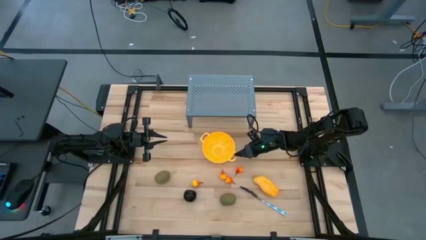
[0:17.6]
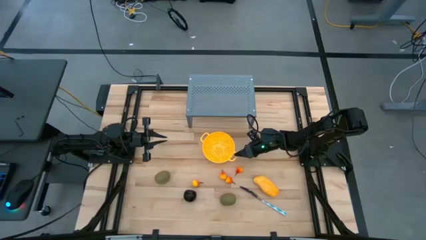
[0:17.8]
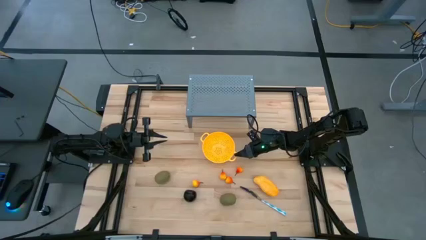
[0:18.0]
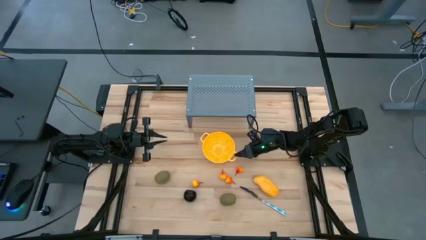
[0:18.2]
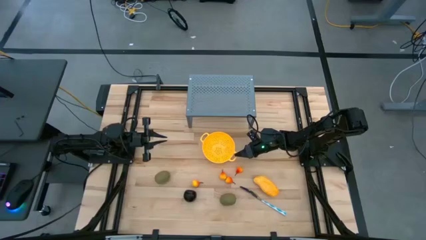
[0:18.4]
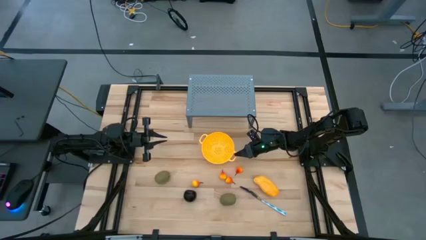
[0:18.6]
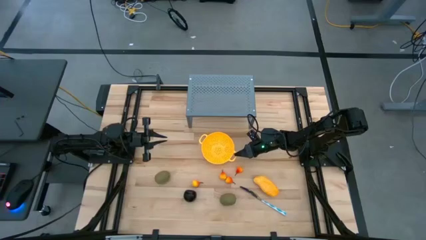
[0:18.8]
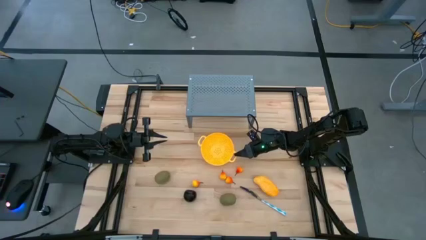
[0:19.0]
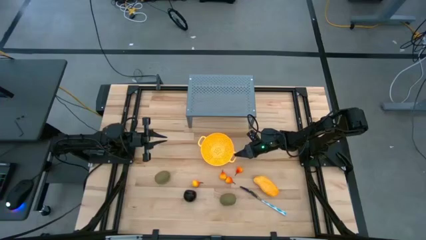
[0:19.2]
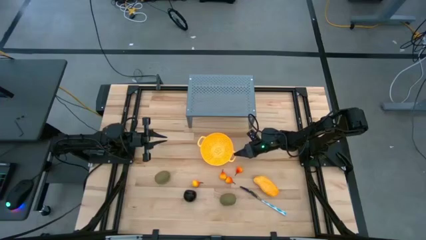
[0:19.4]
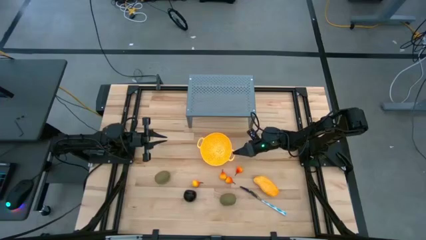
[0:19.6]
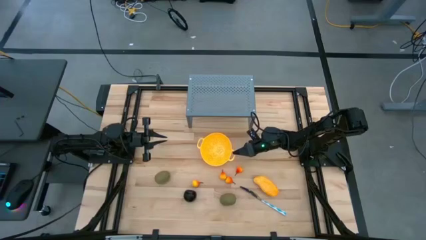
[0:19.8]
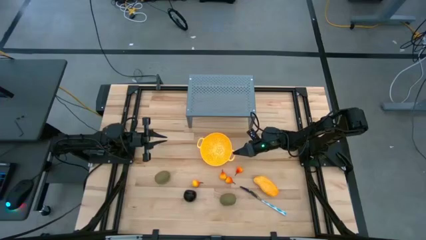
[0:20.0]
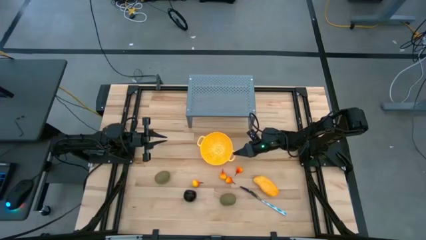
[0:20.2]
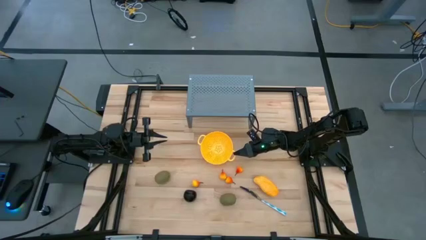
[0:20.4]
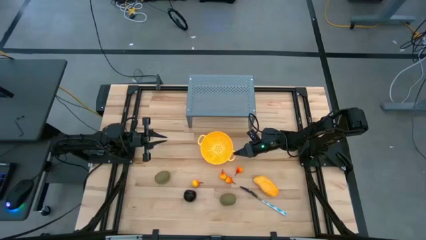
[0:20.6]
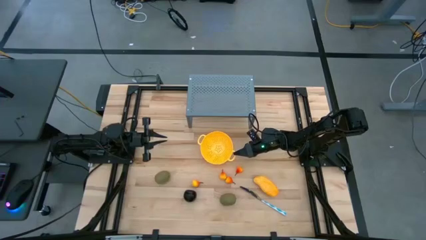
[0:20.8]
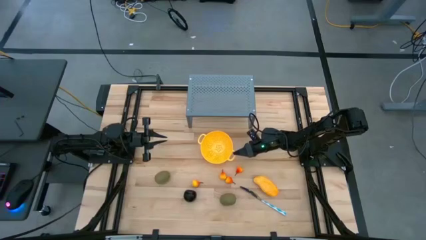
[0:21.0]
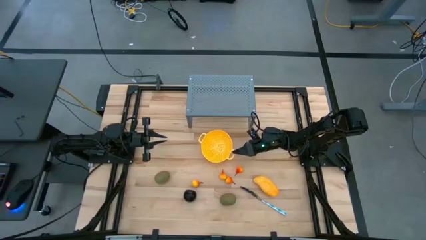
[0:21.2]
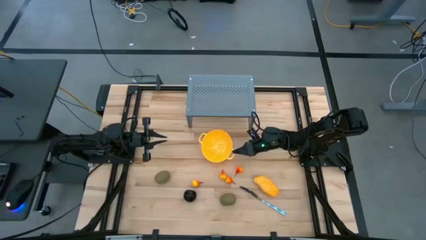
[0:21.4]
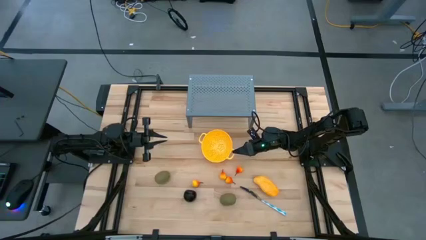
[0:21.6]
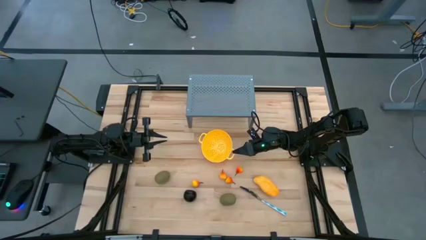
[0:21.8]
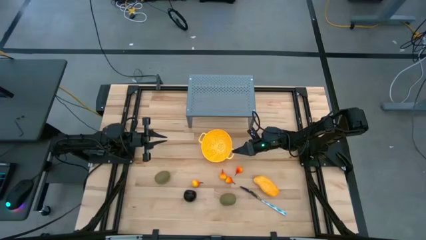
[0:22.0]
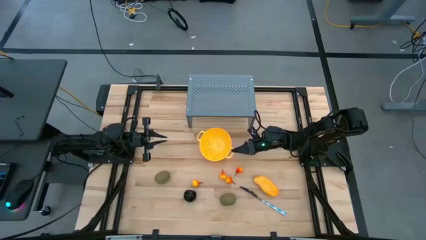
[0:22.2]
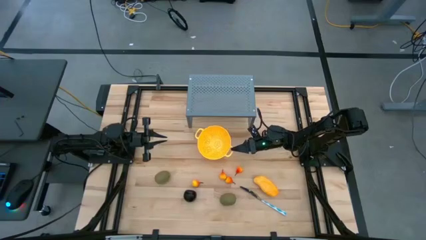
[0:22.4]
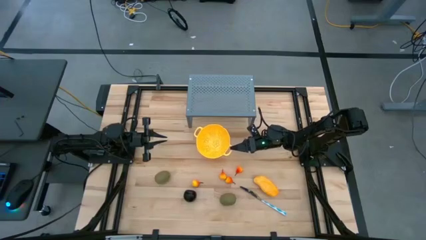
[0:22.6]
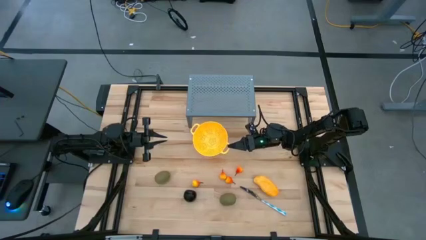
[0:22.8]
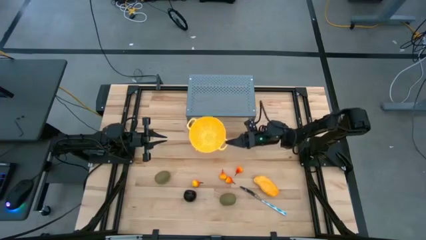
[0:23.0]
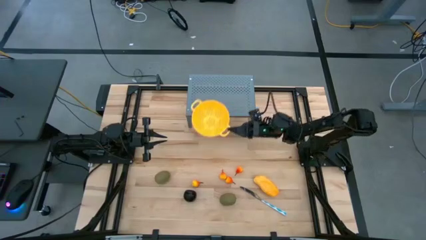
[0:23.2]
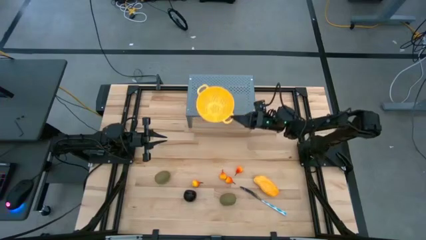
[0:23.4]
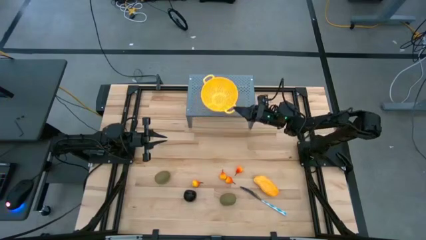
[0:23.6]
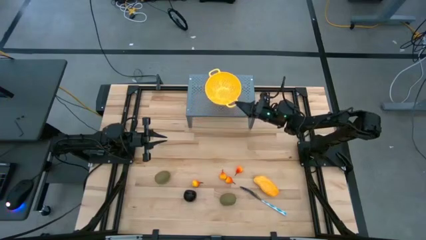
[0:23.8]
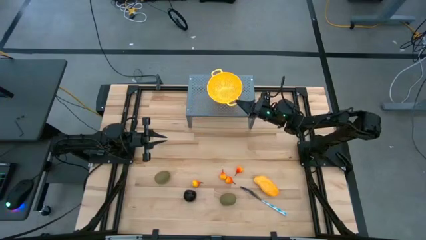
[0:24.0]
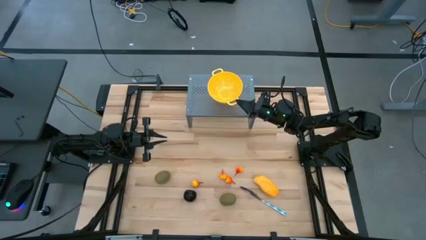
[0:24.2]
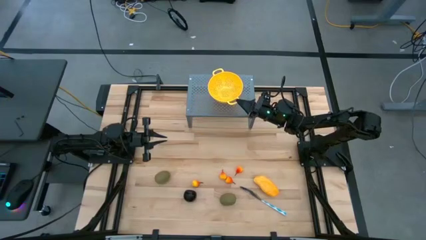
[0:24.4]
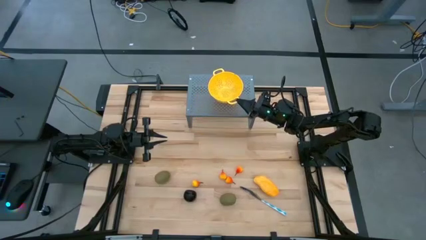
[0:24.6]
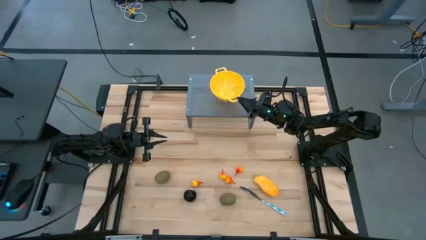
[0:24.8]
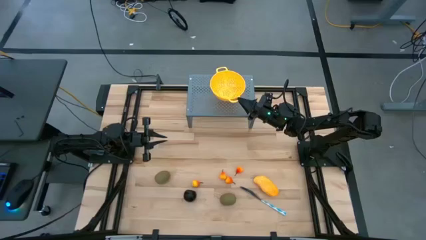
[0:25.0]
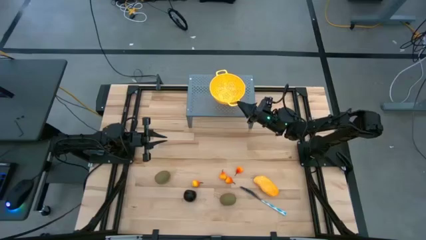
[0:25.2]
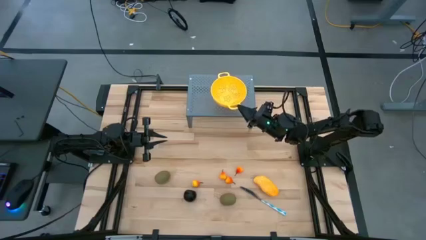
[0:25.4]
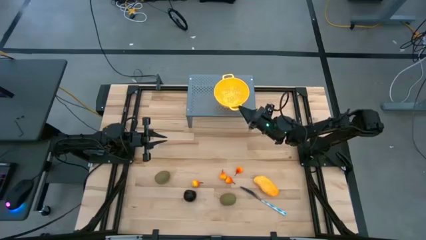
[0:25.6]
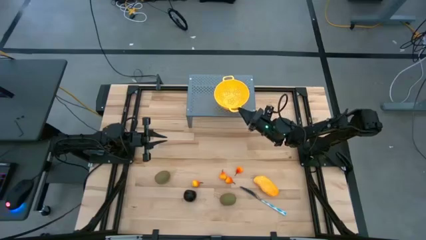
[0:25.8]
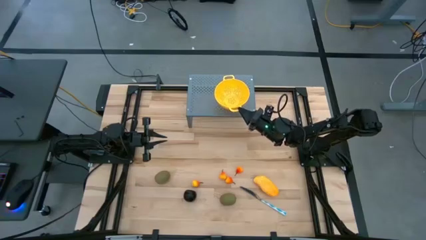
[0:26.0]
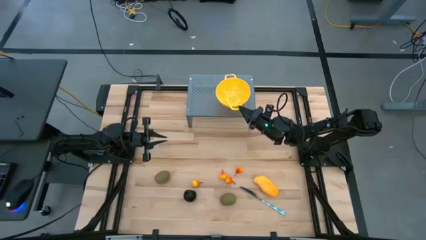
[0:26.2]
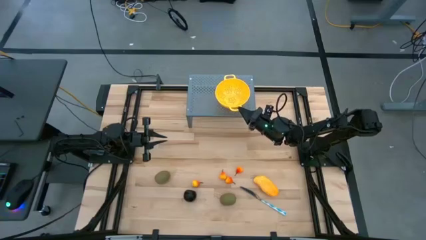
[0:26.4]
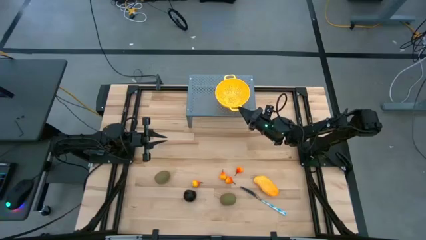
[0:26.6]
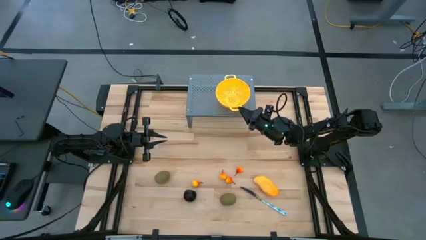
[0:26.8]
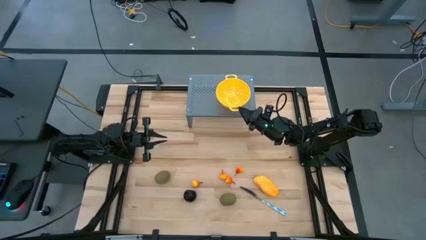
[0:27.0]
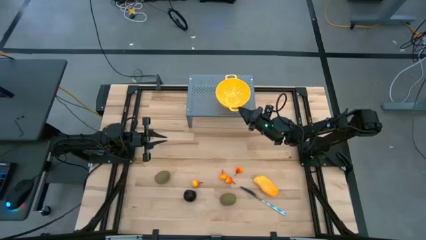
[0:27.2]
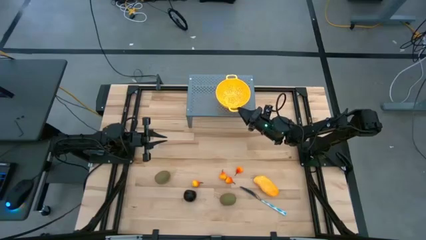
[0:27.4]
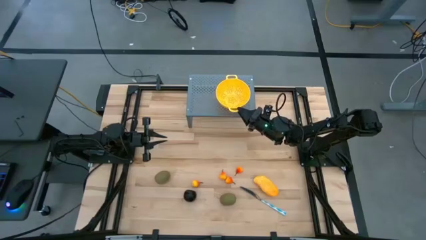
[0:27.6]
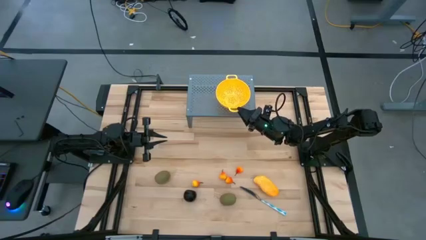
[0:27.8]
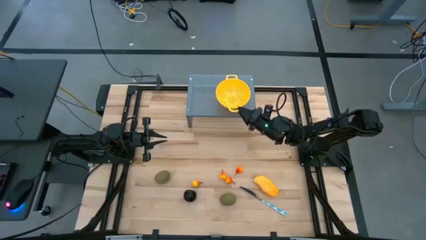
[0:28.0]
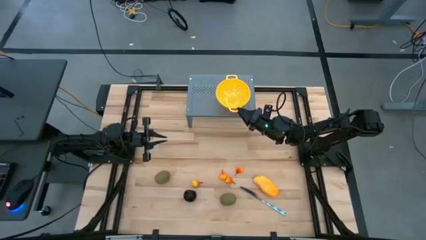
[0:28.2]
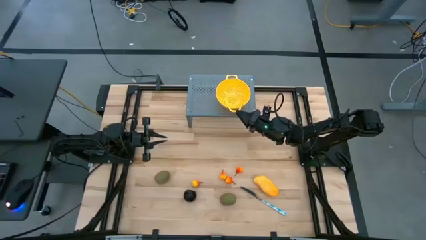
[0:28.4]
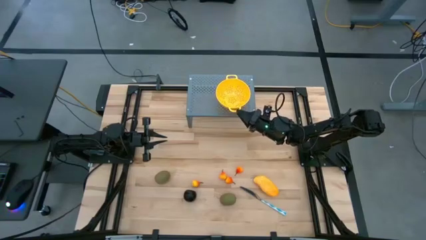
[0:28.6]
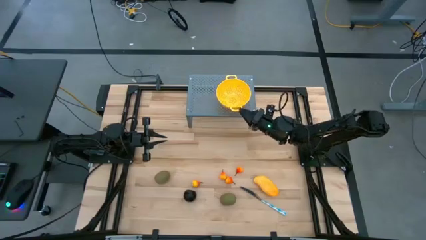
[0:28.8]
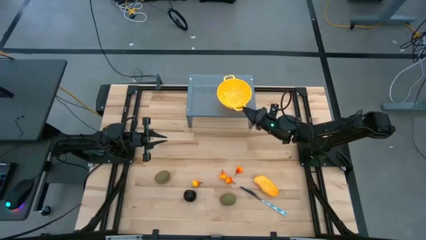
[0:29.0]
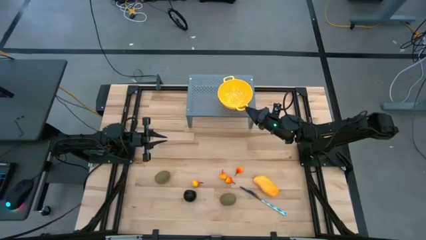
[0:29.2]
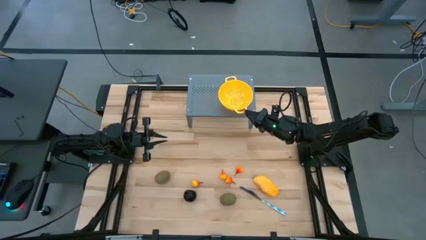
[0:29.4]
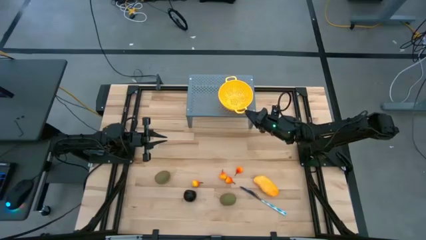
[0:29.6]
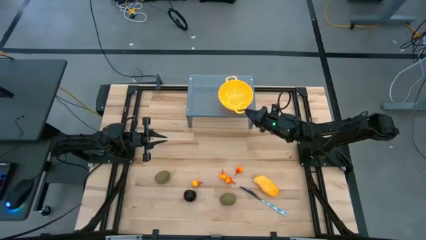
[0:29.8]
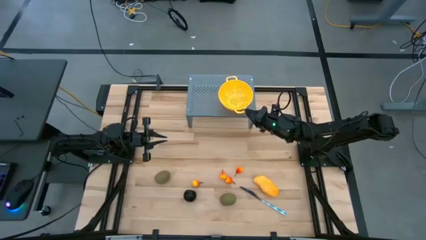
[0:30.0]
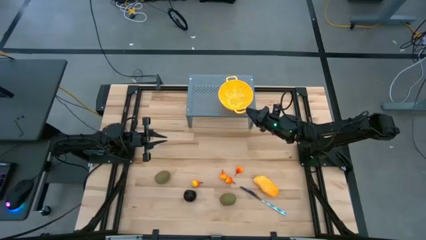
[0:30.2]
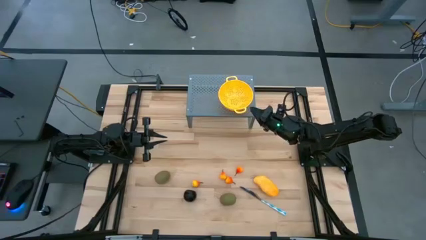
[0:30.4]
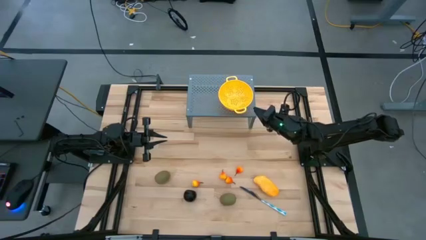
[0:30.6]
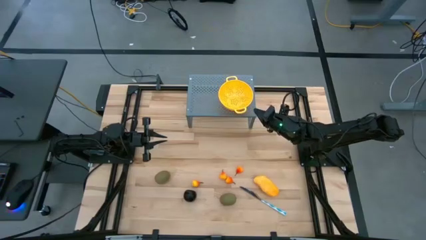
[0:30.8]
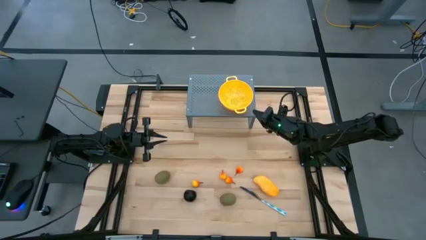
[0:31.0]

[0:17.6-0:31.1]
Task: Pick & Place Fruit
Put the yellow strainer bowl on the shelf
